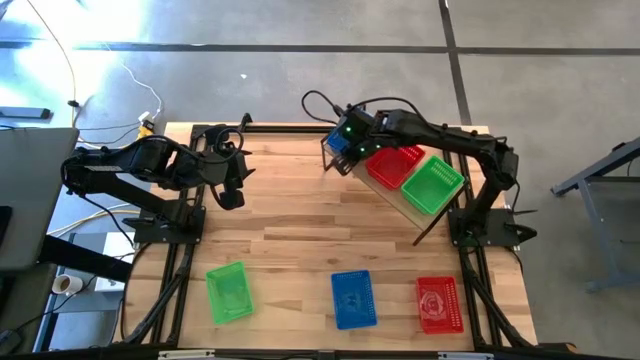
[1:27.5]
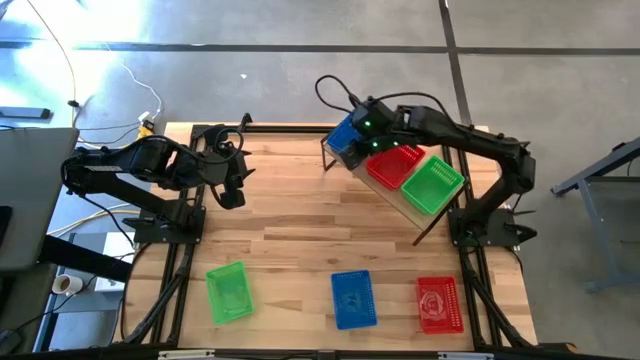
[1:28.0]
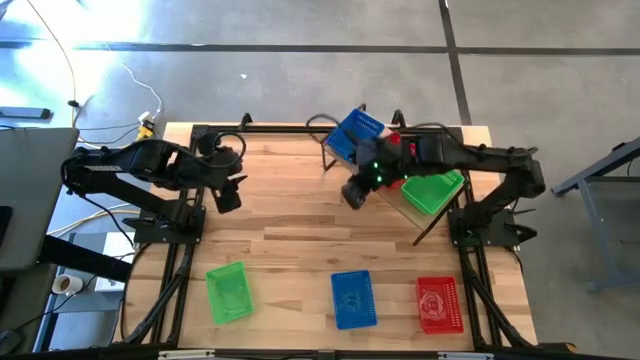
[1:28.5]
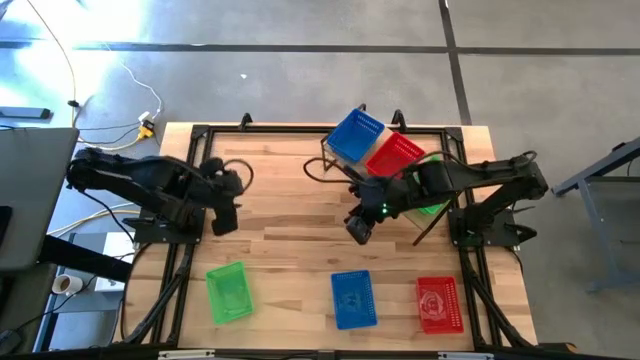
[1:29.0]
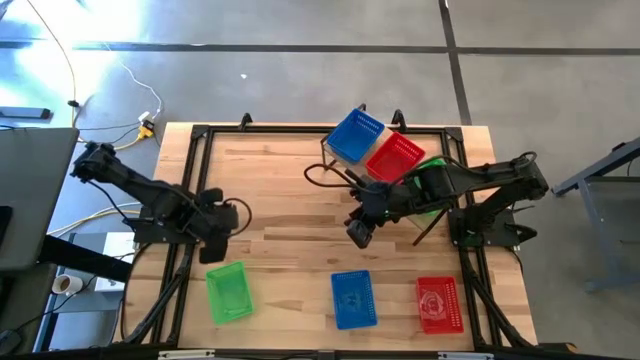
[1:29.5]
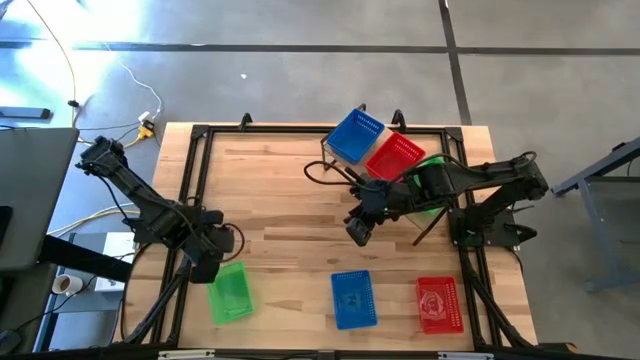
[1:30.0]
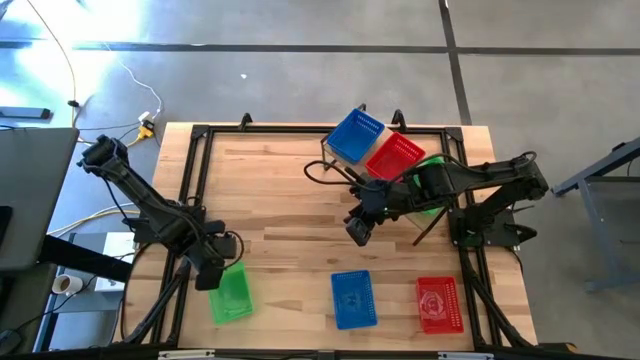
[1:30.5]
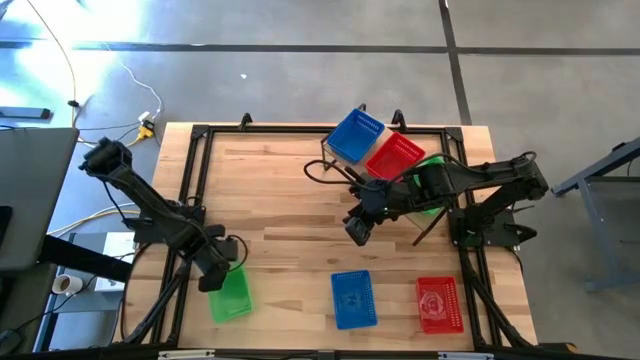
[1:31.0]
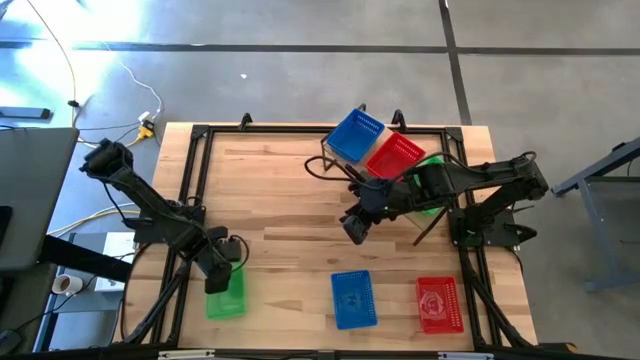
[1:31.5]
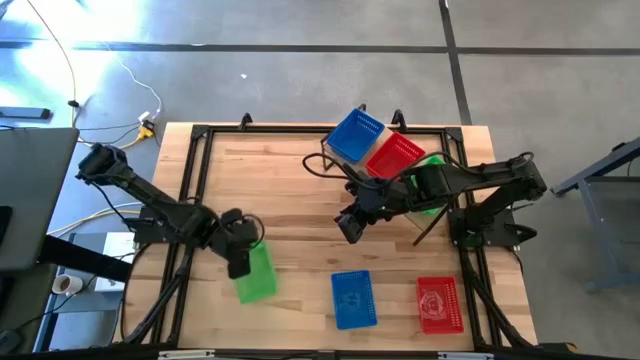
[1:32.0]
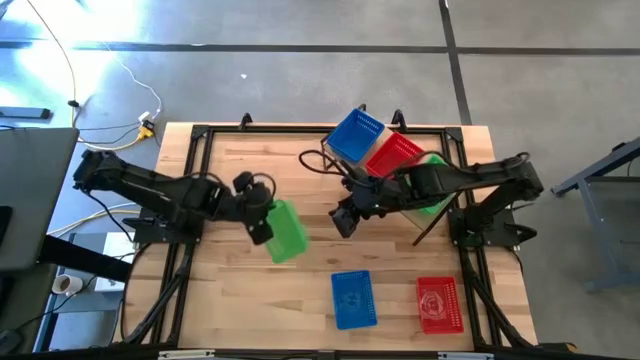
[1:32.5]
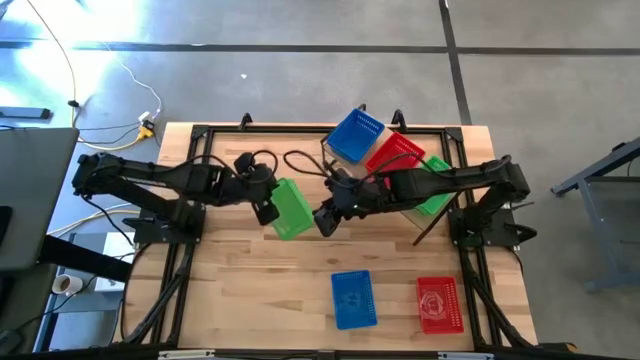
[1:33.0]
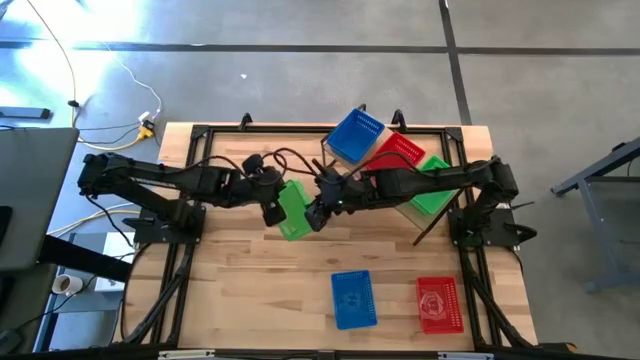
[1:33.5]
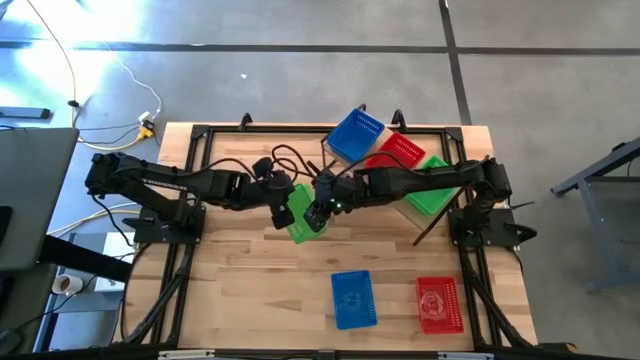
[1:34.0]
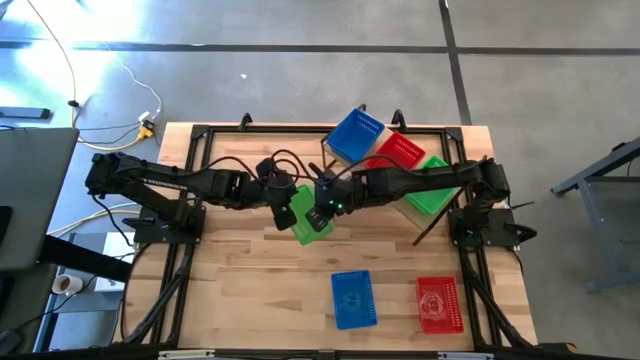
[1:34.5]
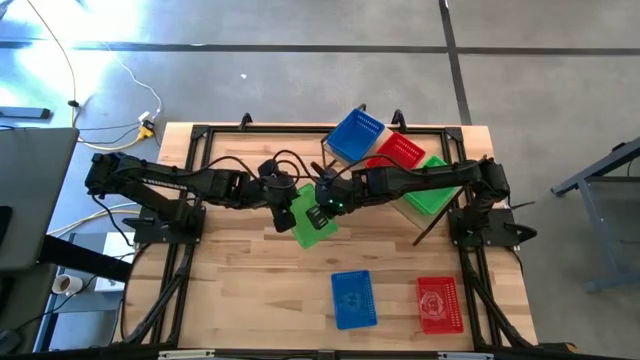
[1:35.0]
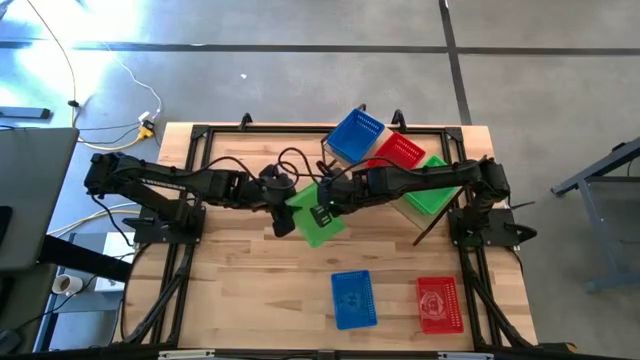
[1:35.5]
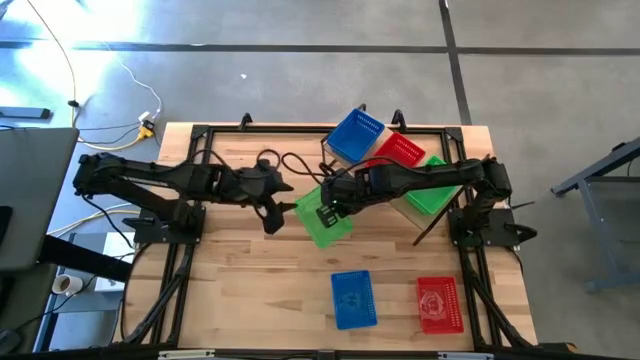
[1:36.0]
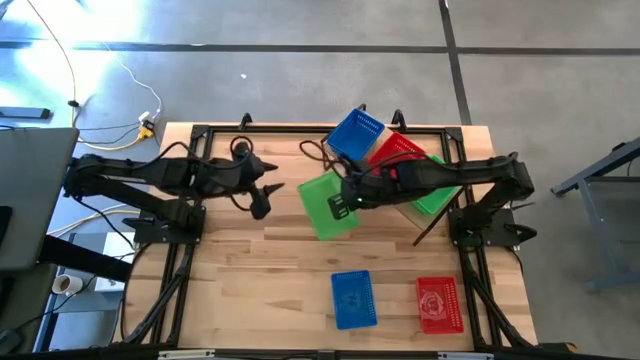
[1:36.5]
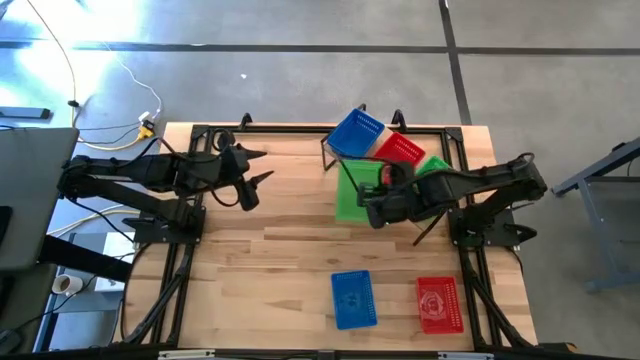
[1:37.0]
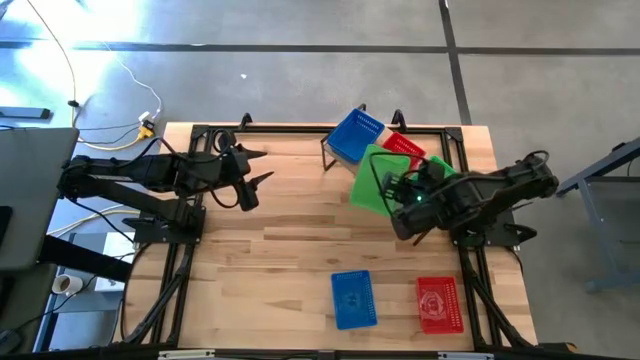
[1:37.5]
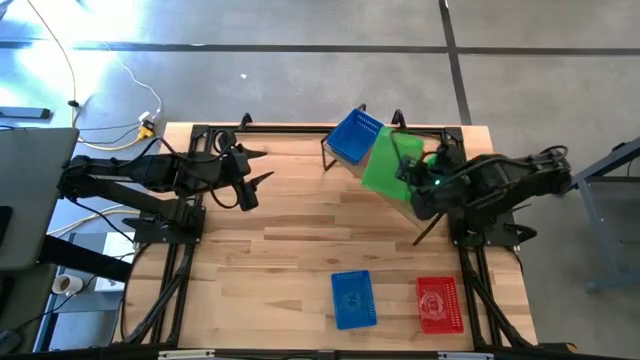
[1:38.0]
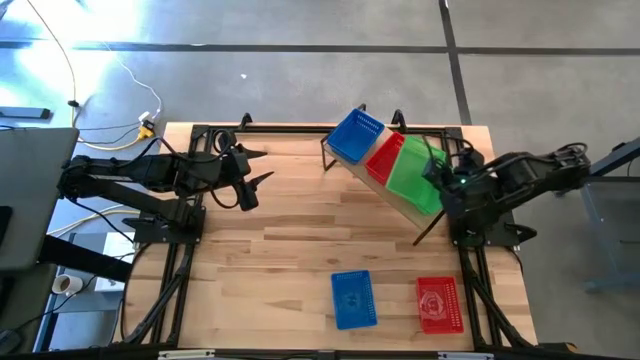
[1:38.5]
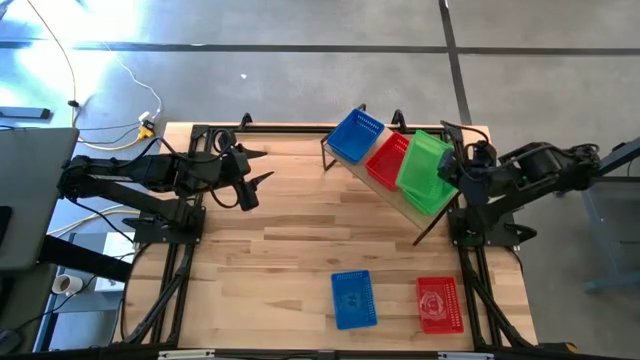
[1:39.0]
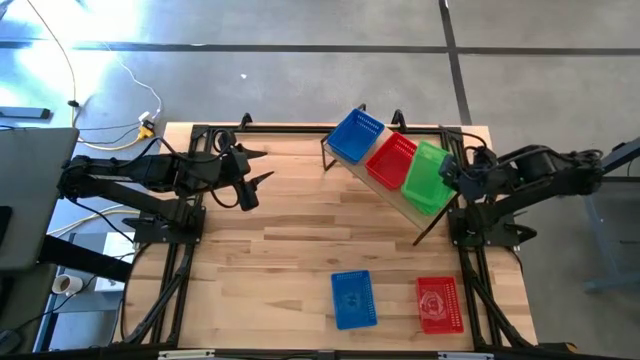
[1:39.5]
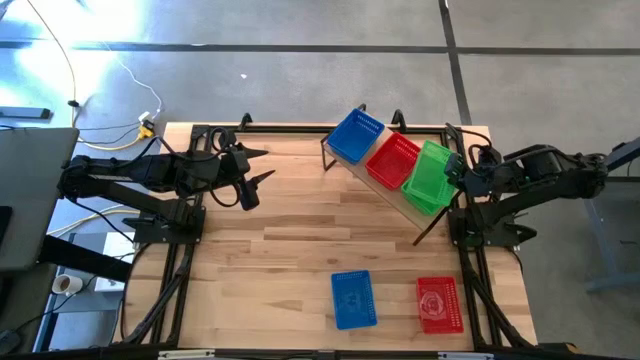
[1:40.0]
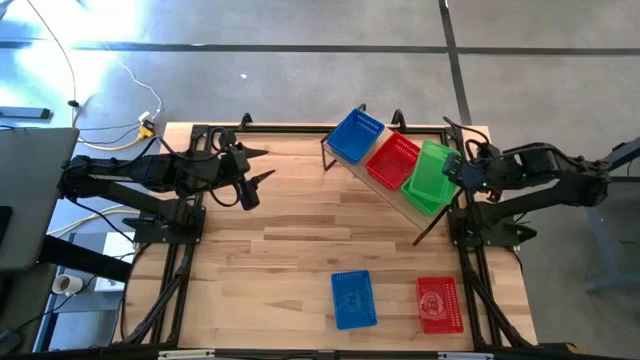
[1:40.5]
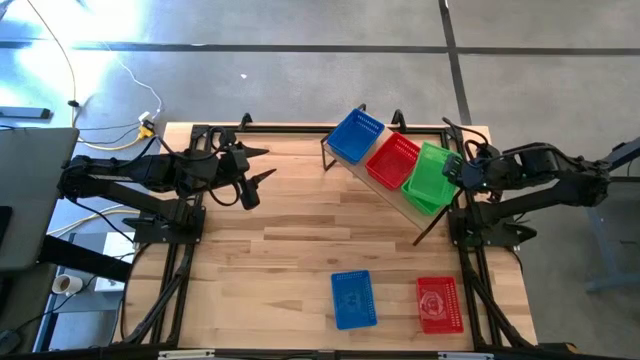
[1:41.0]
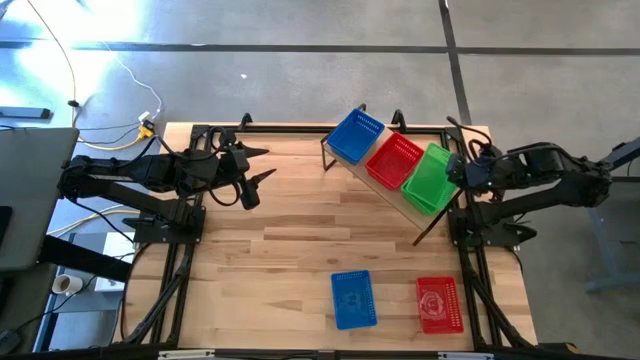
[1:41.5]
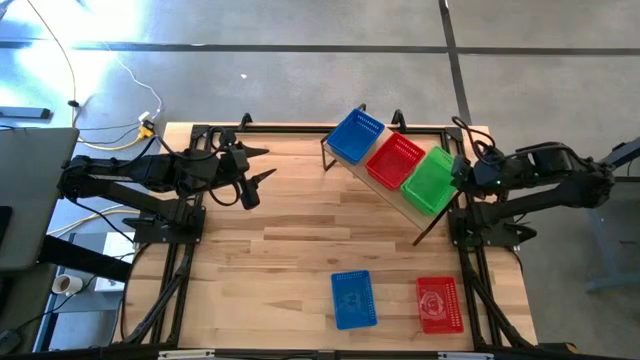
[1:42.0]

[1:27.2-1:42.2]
Task: Stack baskets on shelf by color
Stack the green basket on the stacked green baskets on the shelf

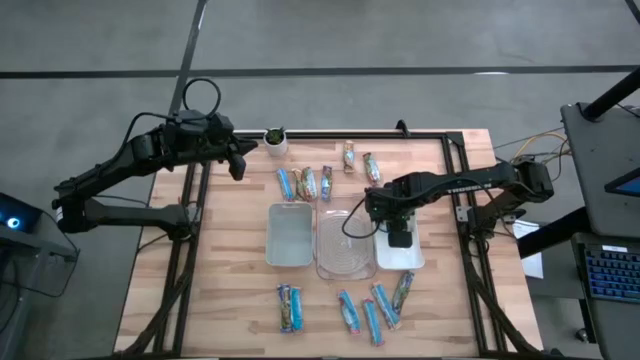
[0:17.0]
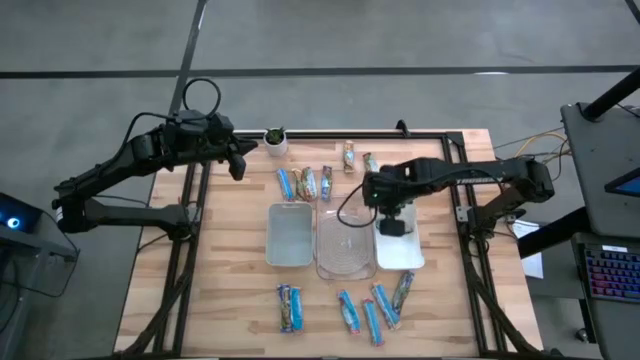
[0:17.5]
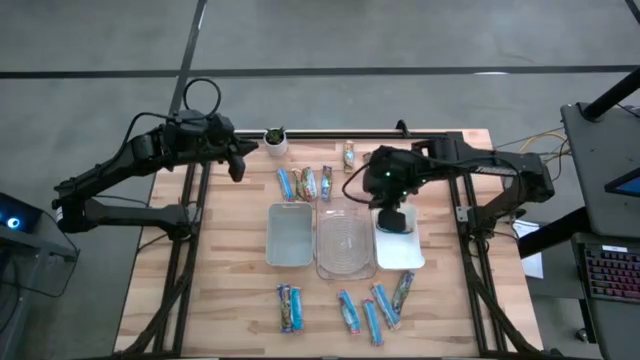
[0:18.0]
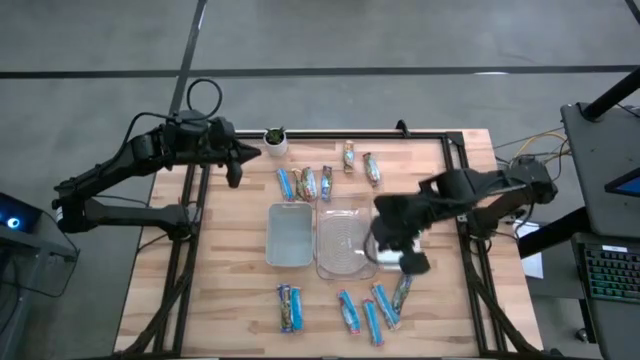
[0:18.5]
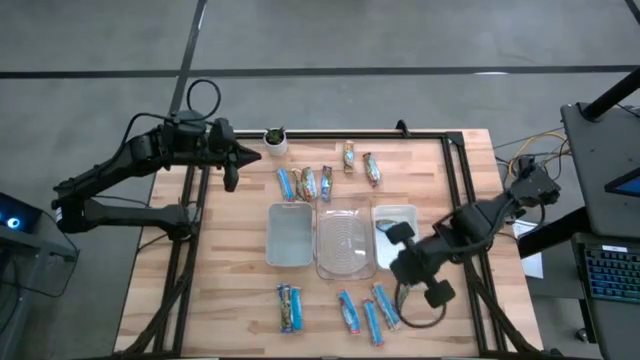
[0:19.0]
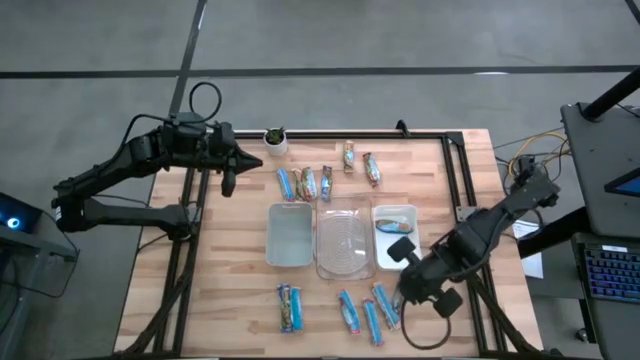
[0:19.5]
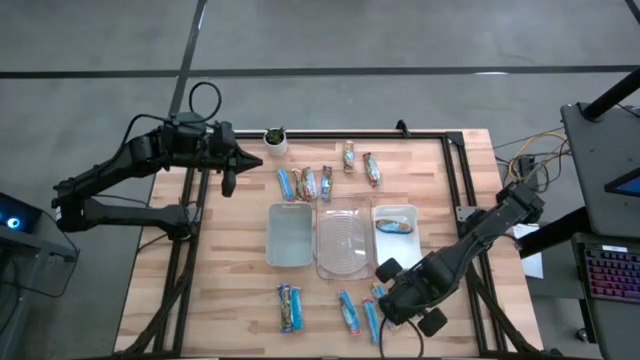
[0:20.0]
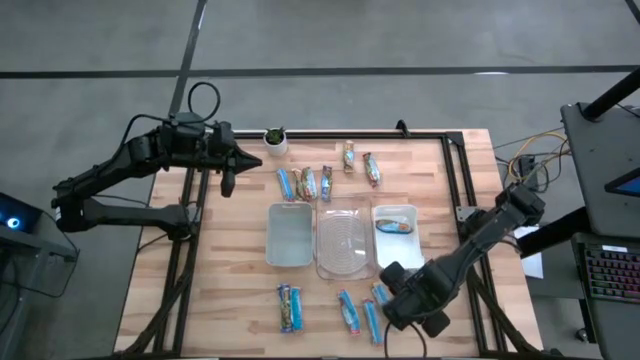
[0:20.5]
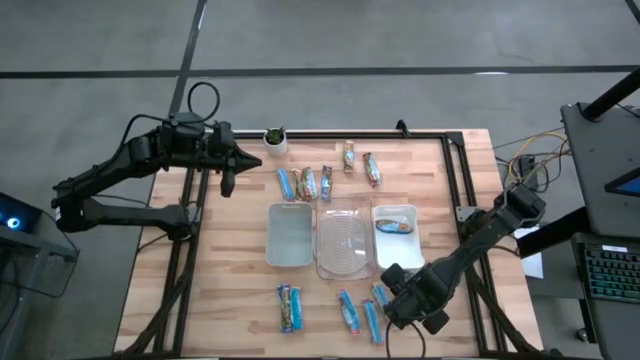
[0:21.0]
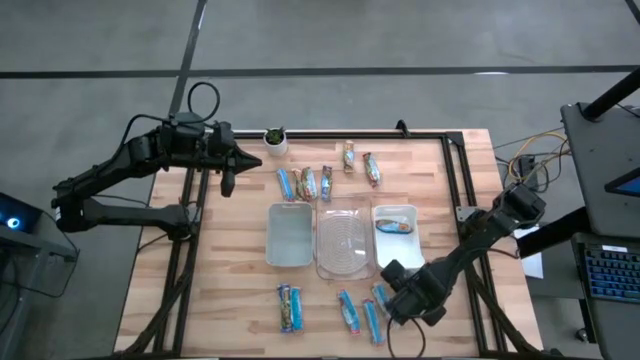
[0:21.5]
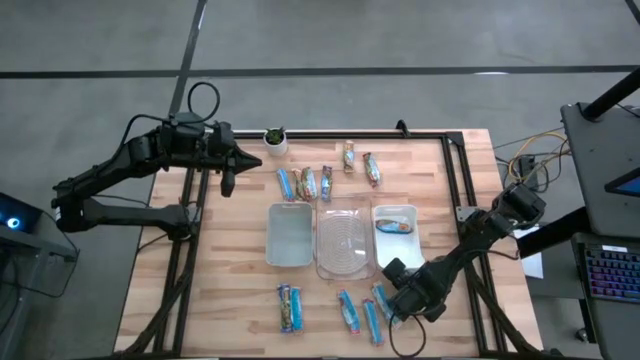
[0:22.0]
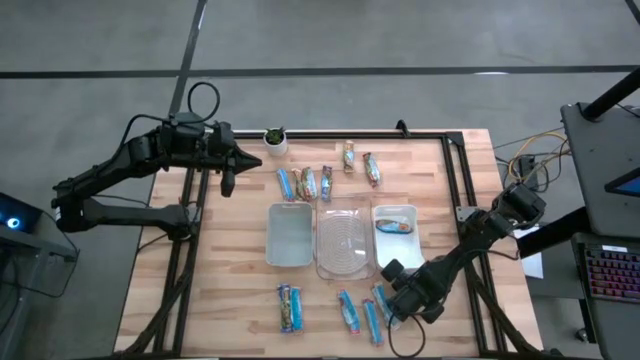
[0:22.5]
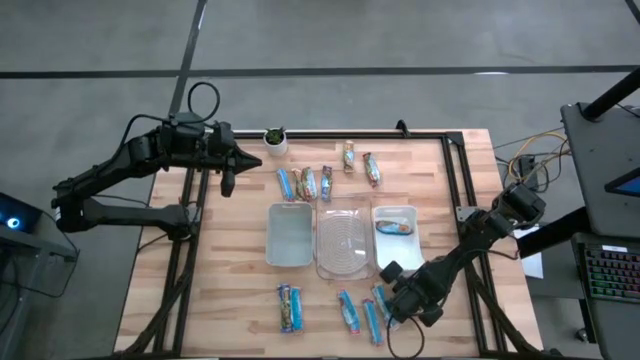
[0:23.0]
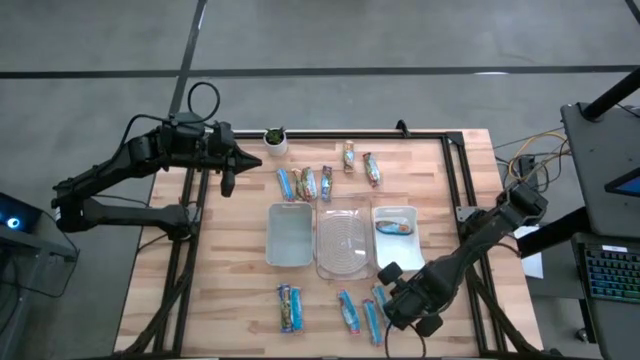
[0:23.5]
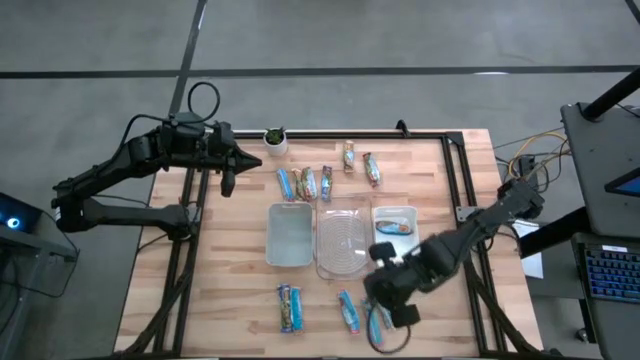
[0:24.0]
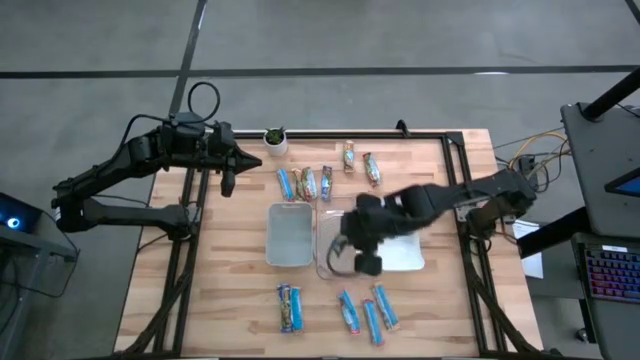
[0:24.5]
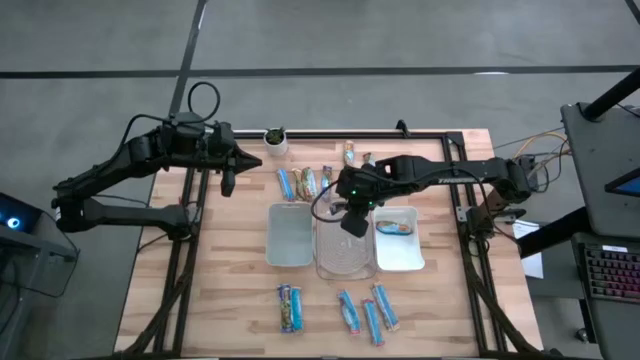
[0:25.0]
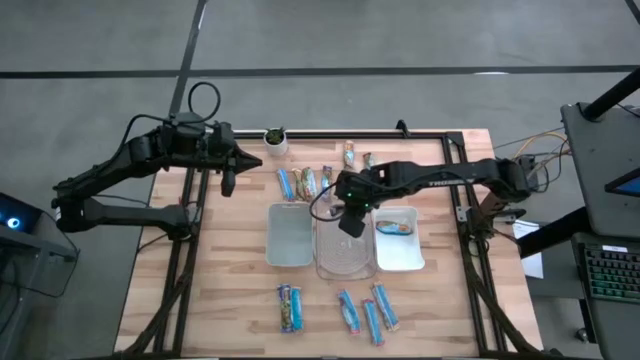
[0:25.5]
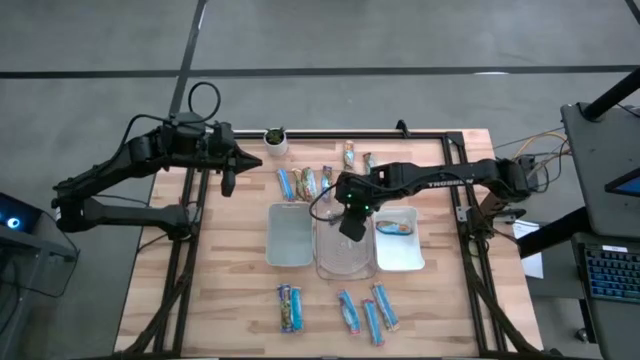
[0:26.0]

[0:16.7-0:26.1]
Task: Pick and place Granola Bars by type
Put the right blue granola bar into the transparent bin
